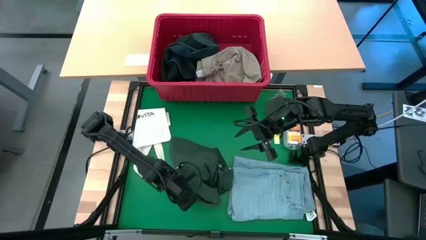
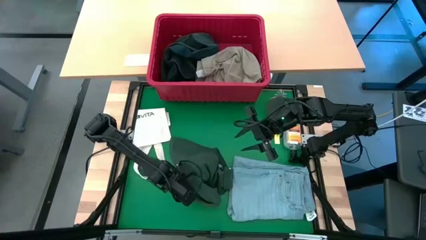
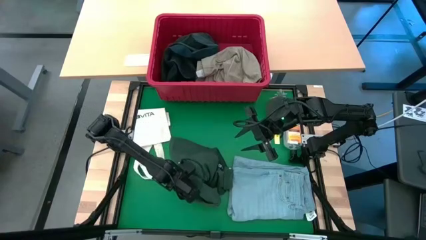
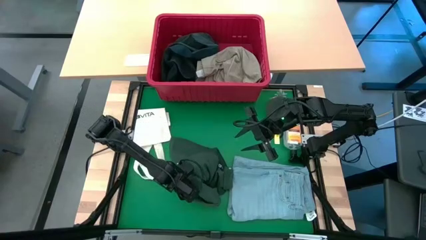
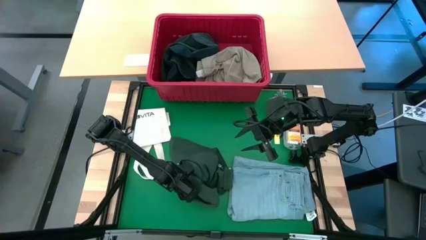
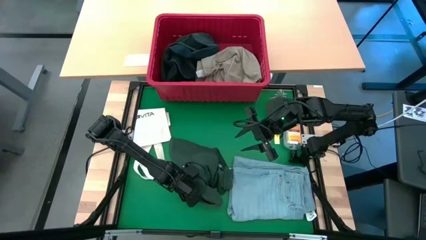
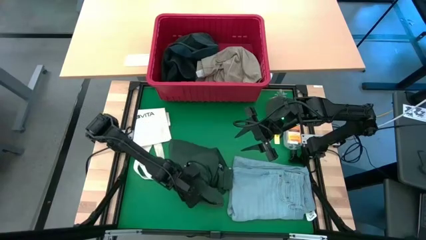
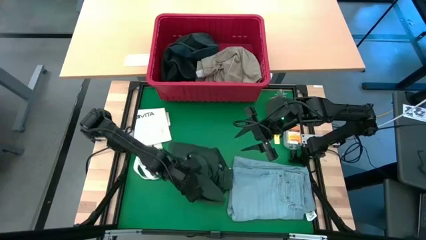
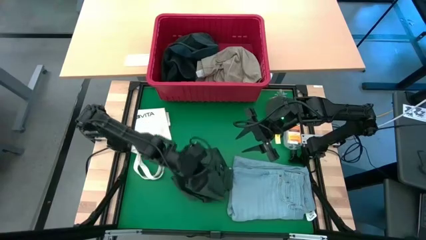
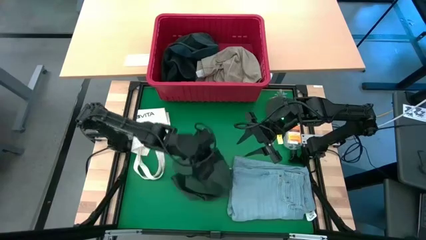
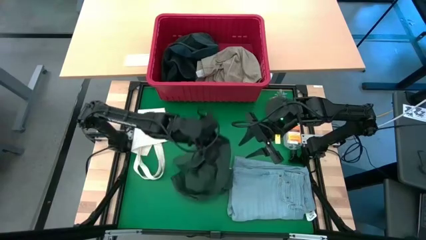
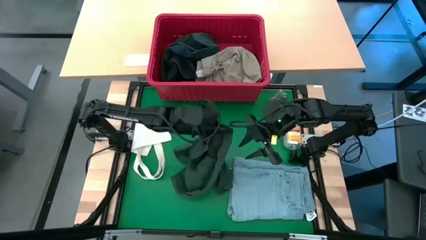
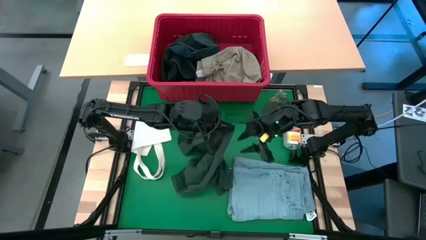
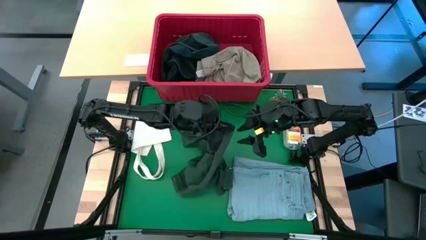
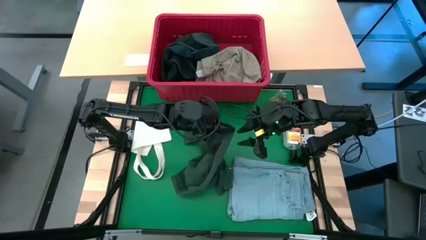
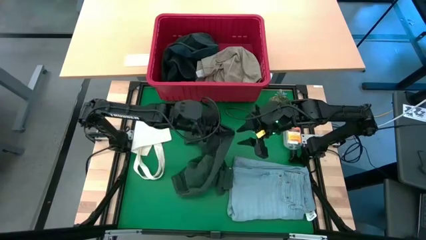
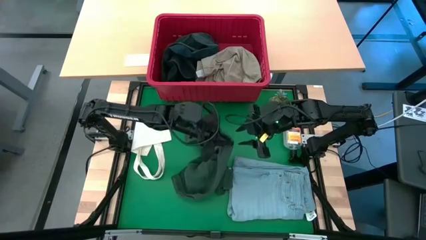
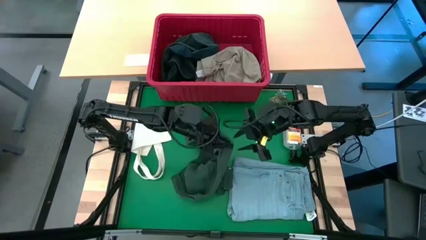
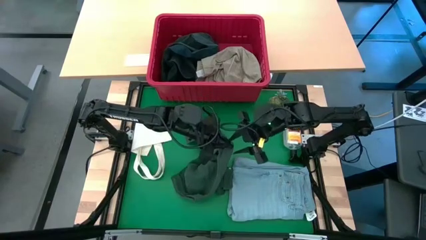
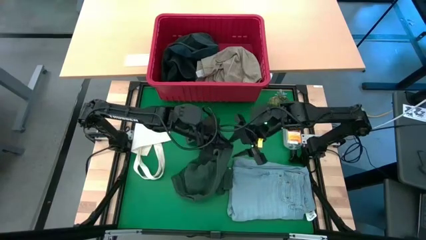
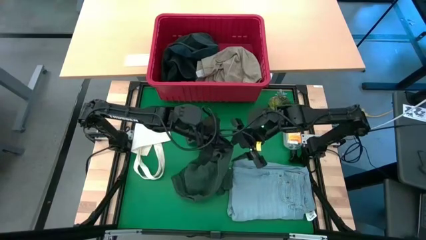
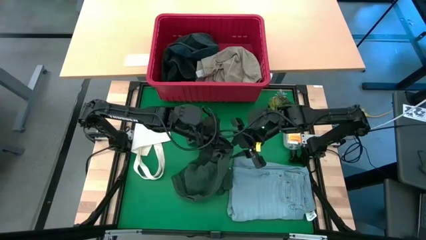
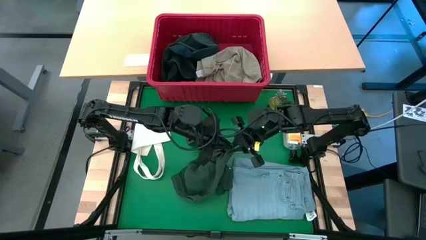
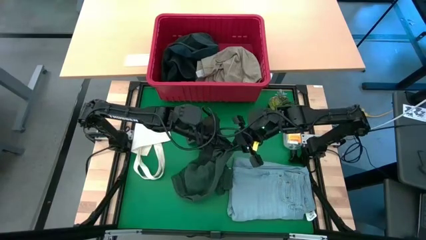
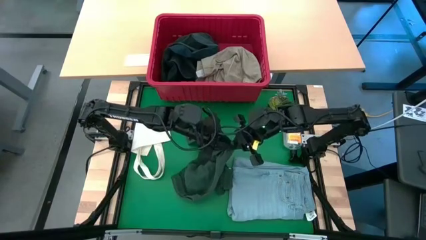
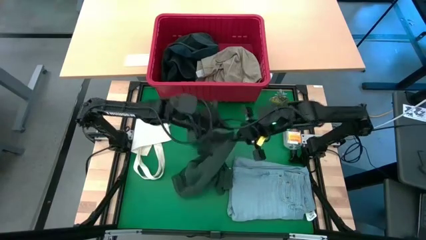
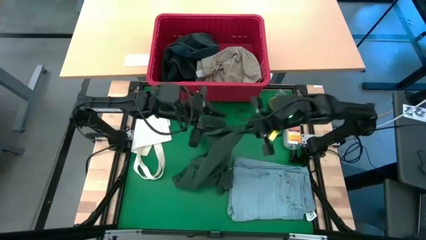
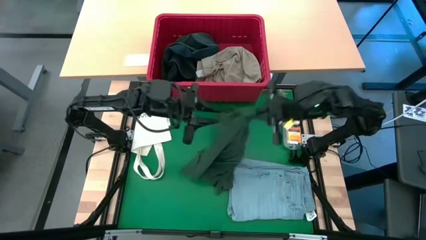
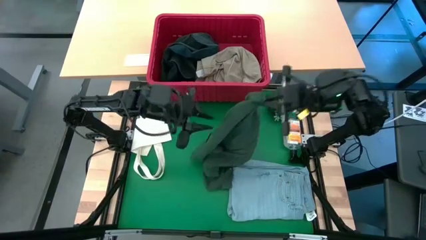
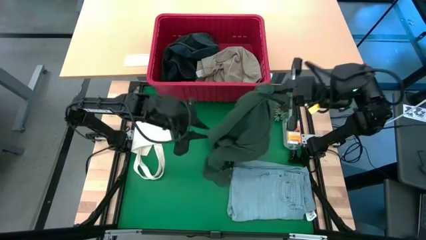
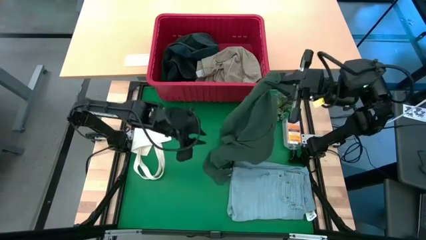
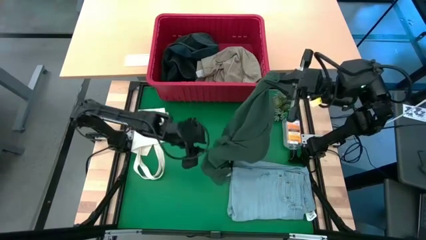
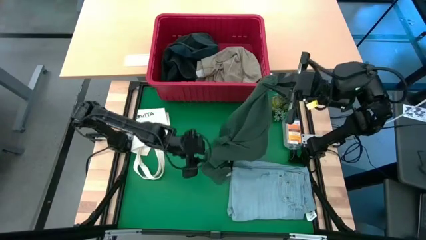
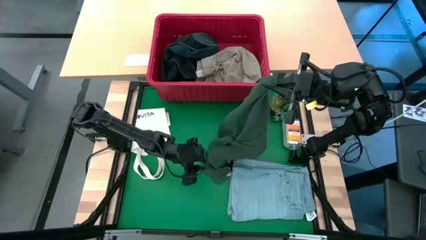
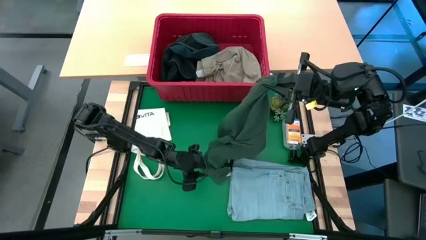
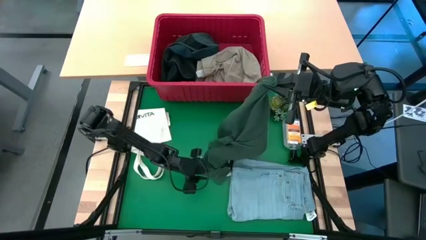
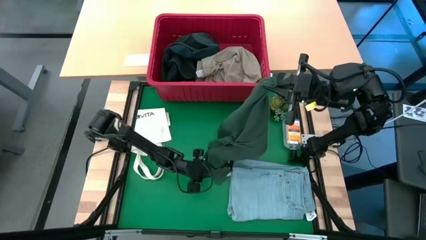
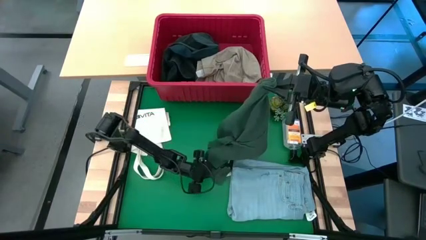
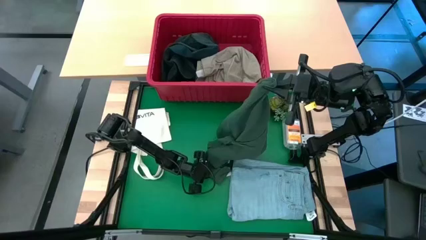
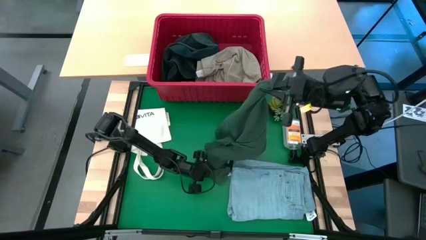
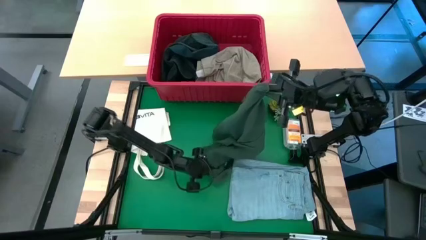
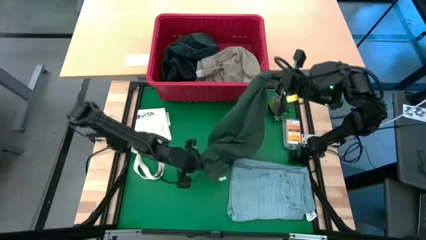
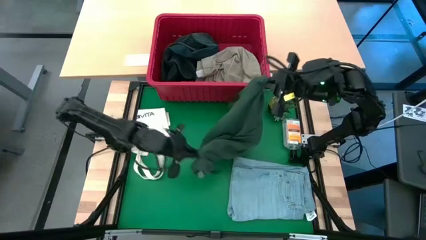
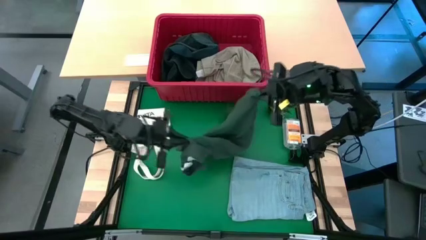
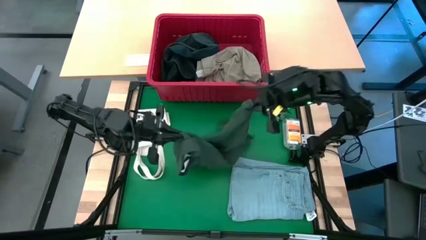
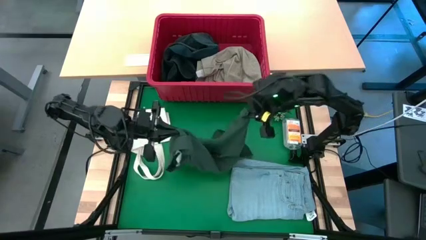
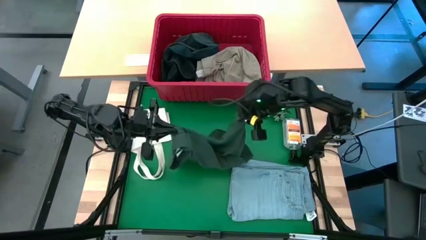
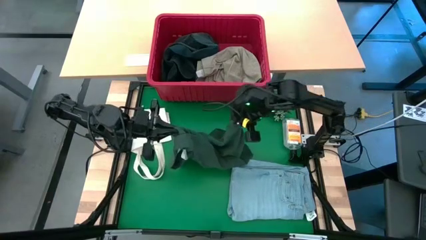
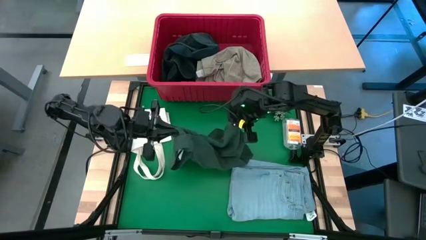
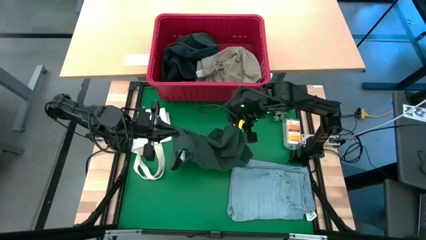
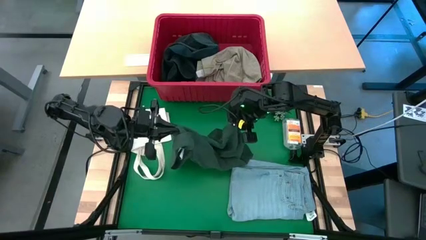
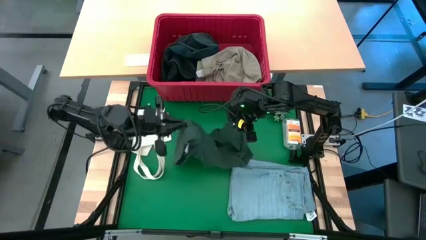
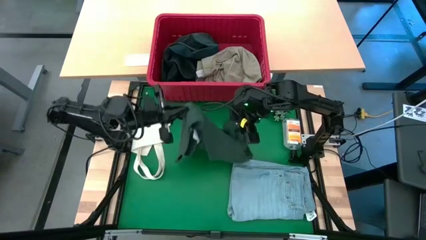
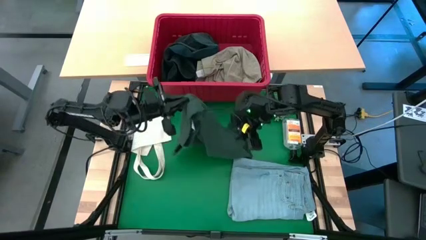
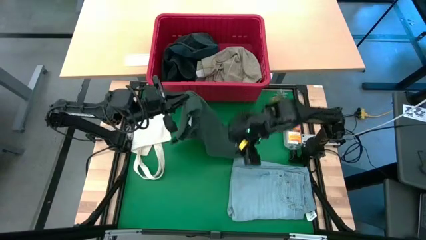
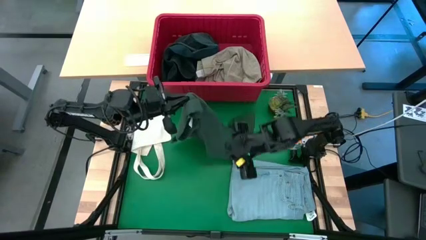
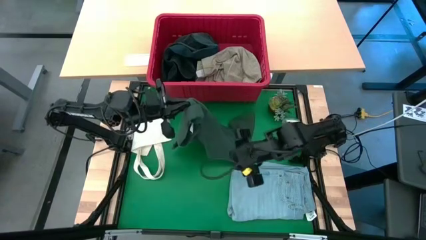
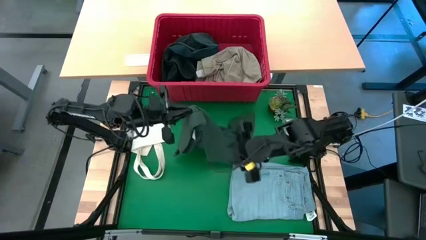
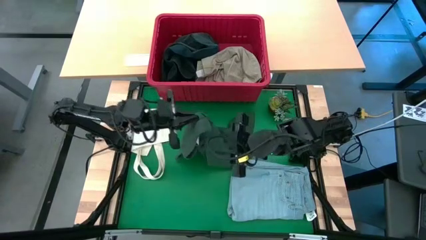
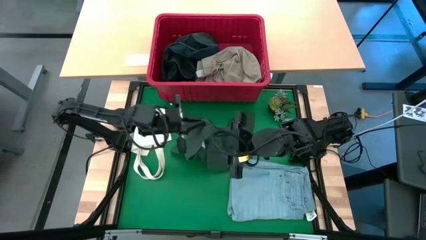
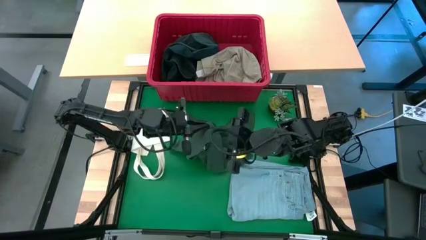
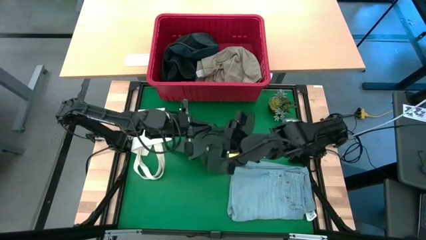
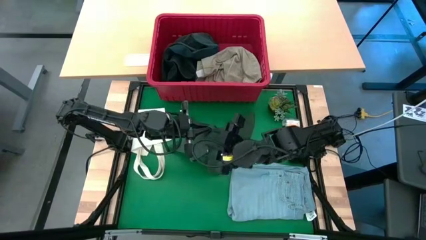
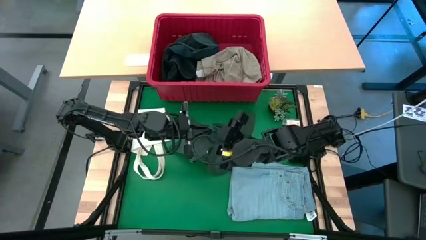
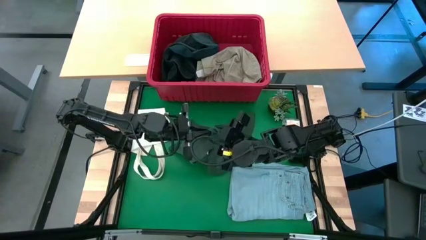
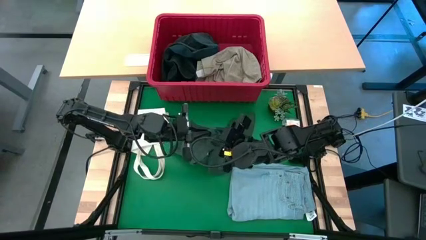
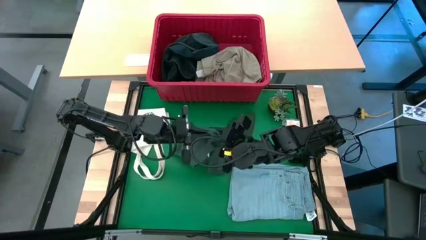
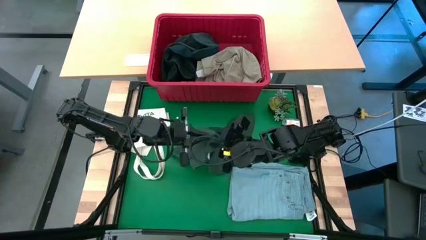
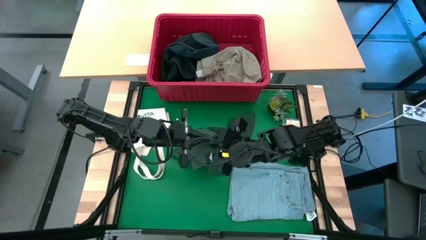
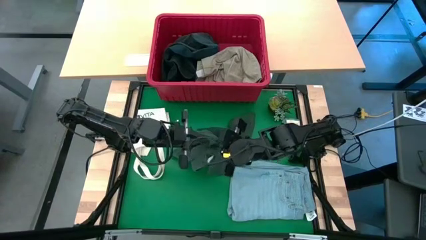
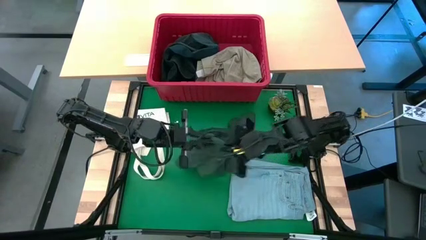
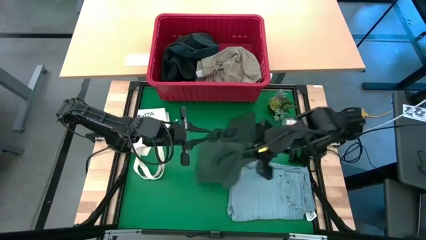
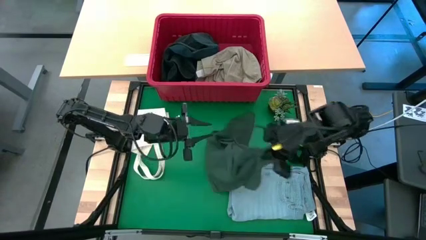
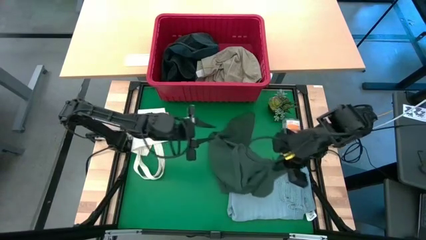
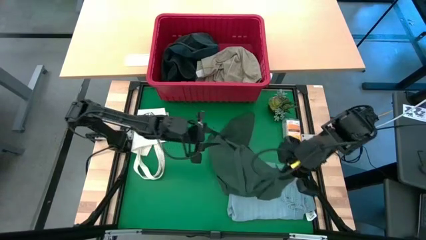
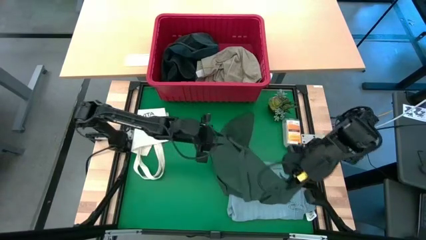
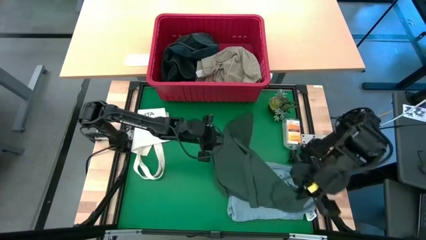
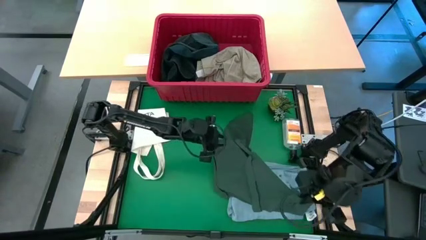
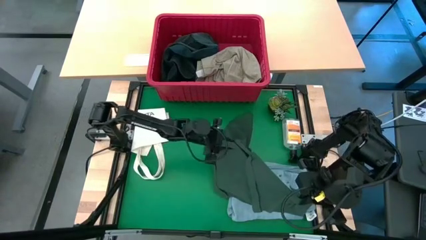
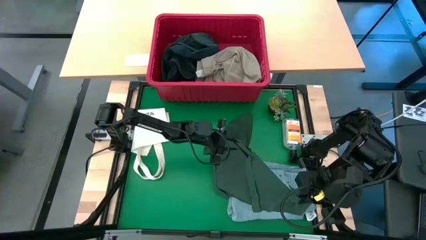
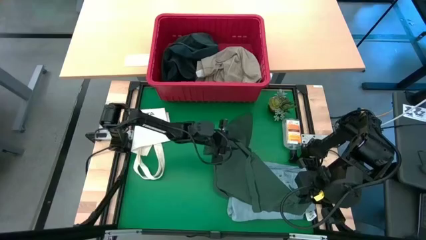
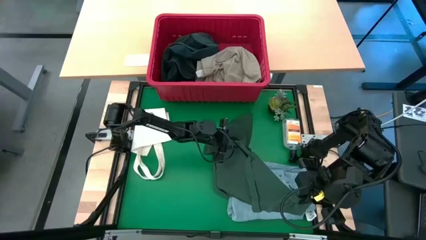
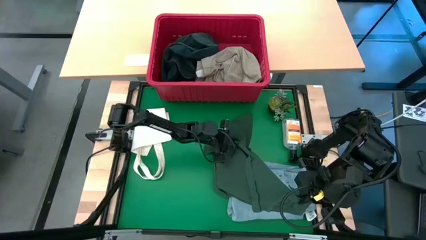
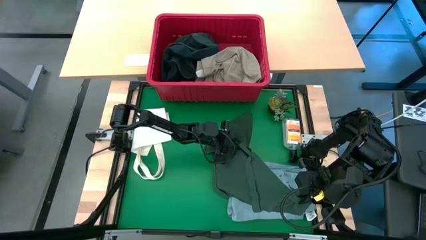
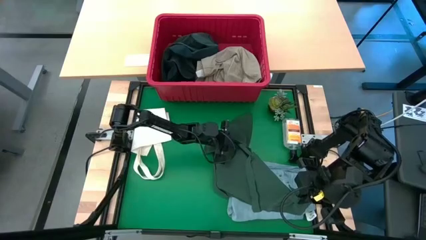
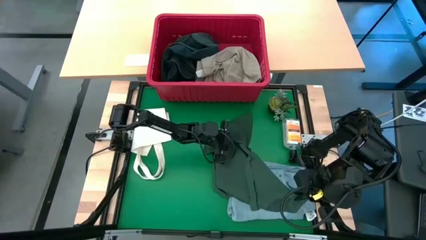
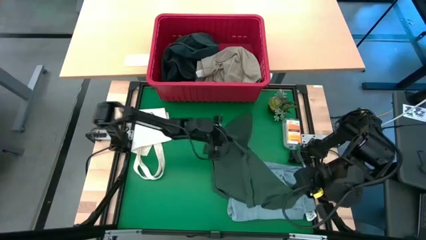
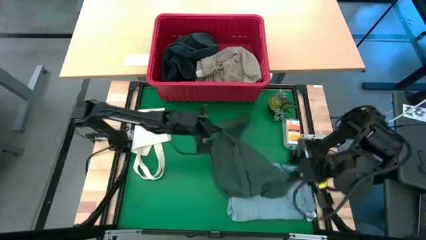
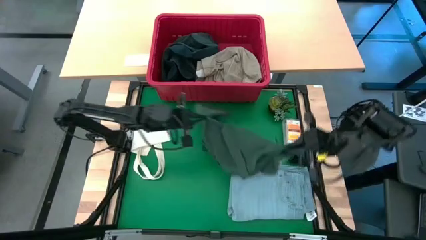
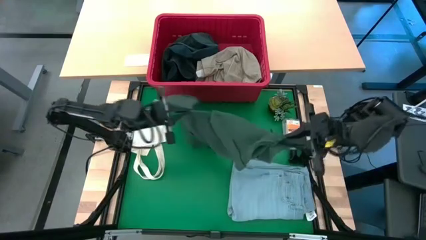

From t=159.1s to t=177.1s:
Task: Fold Laundry from Bin
Fold the green shirt
